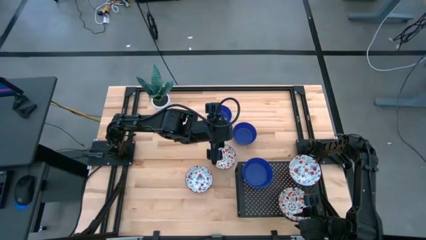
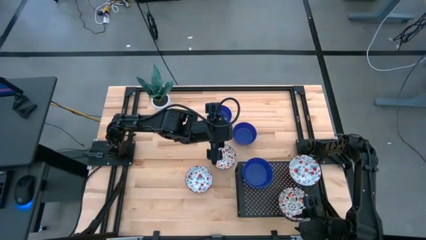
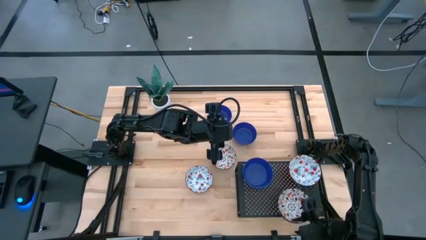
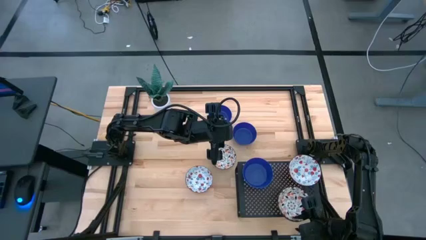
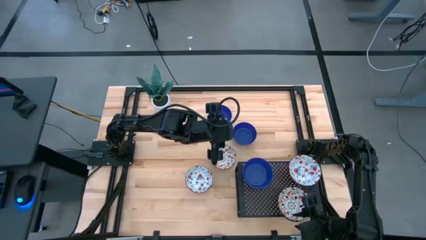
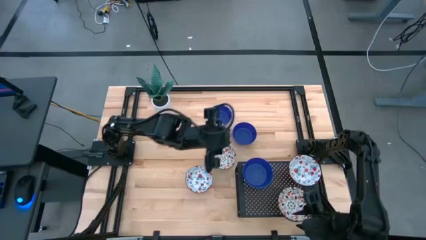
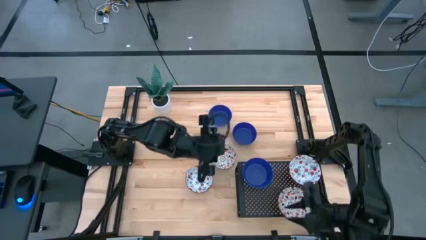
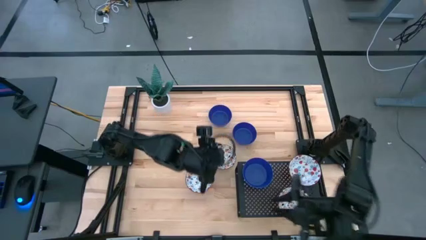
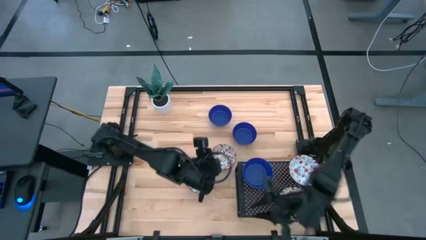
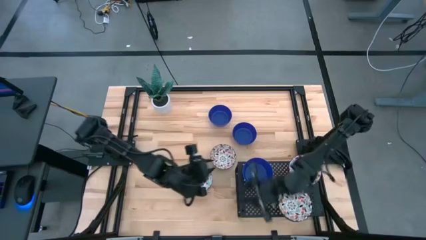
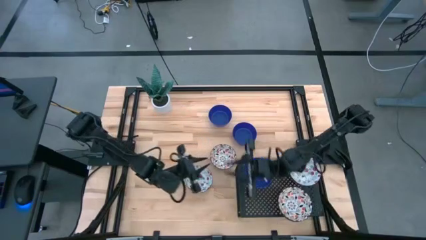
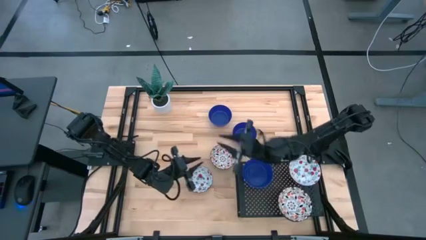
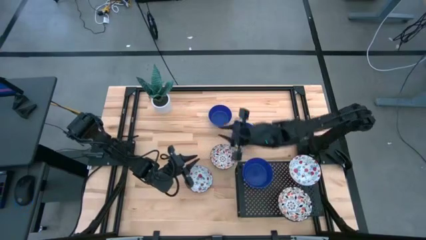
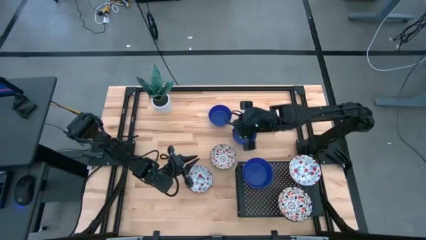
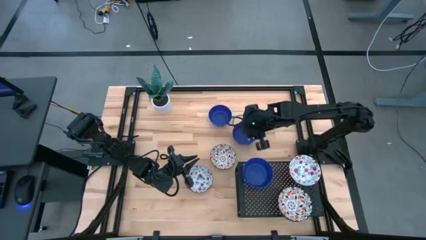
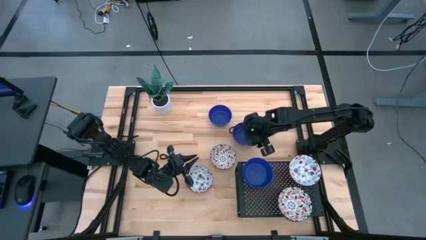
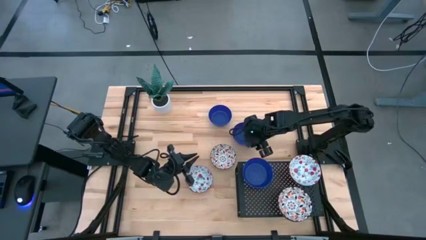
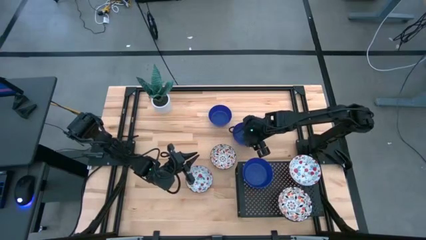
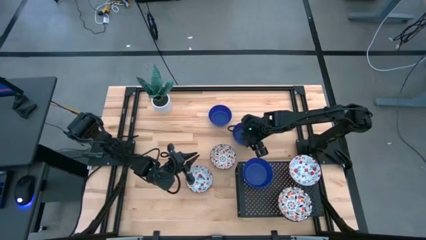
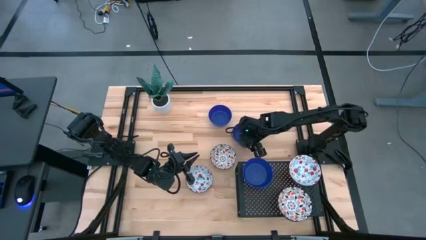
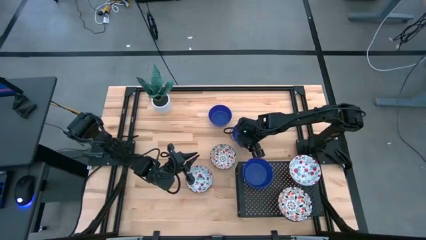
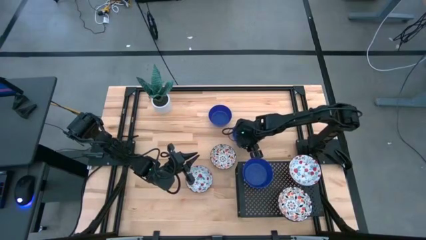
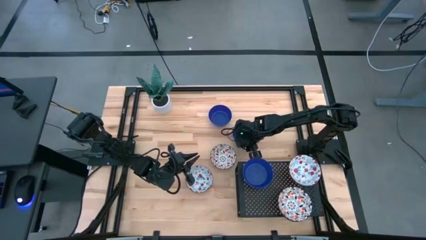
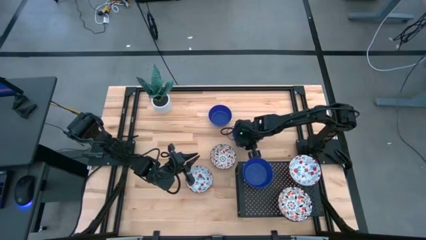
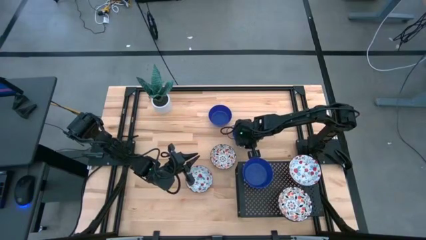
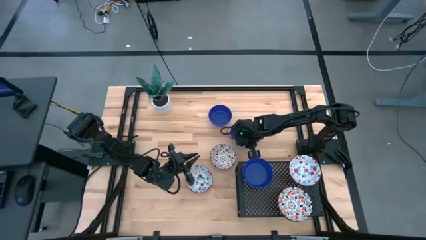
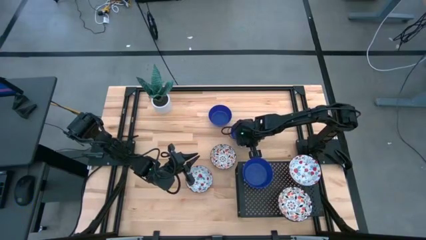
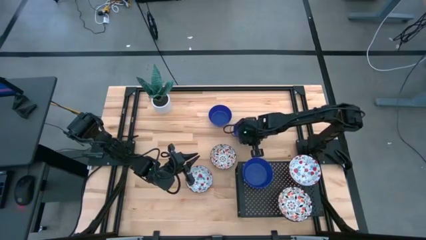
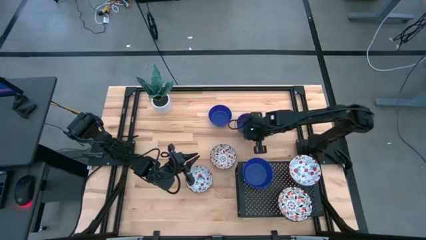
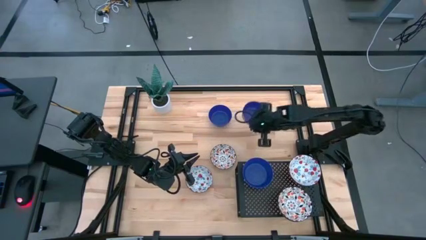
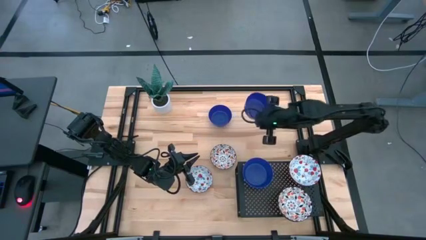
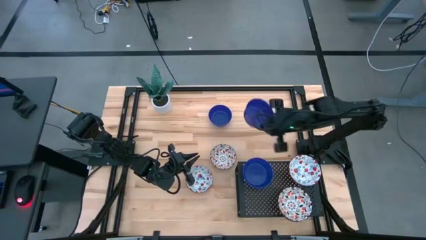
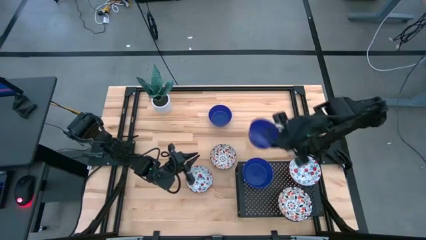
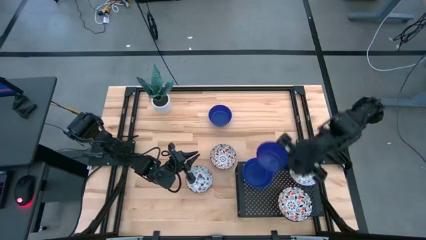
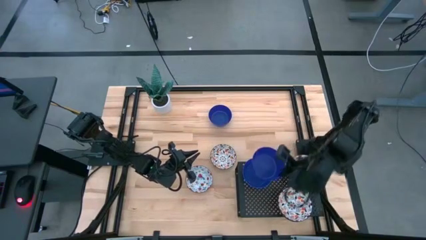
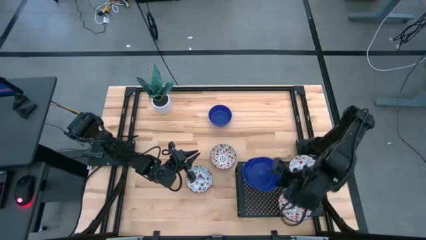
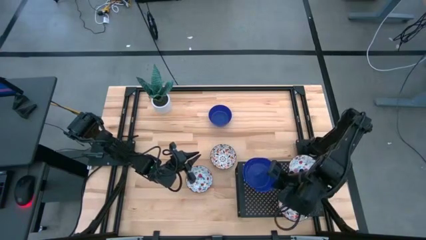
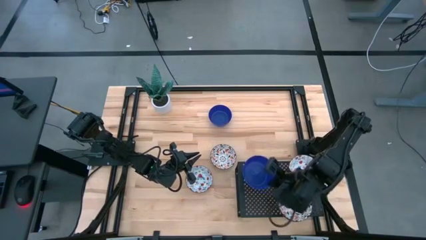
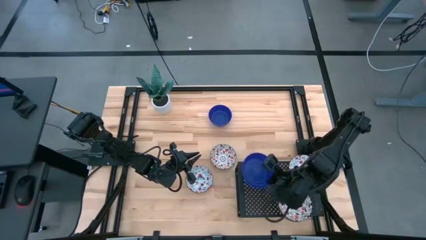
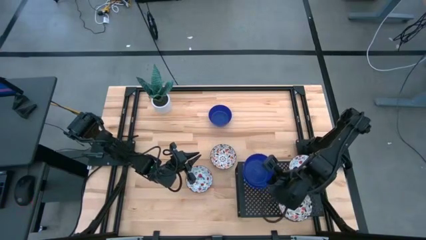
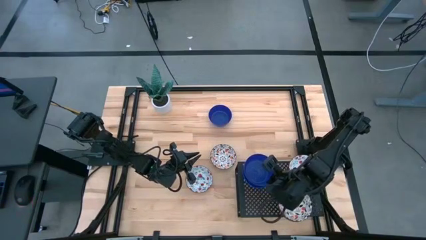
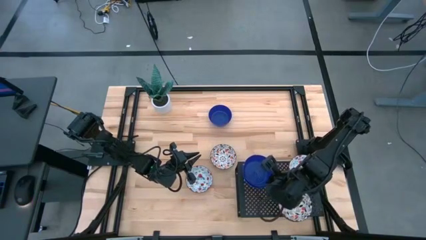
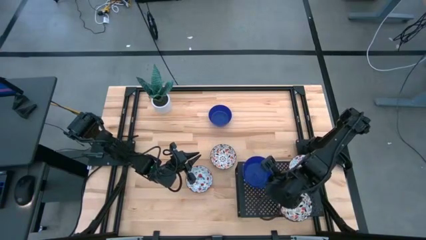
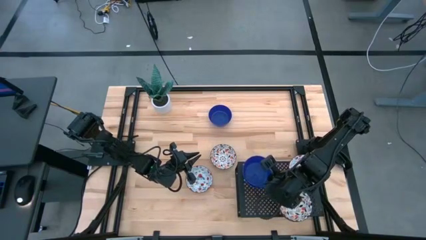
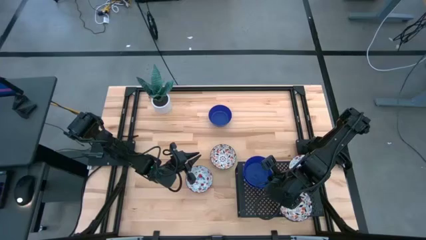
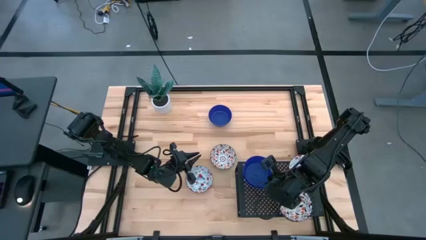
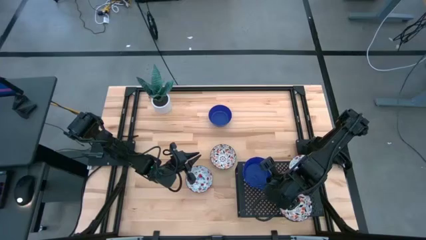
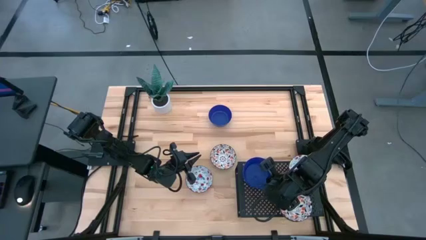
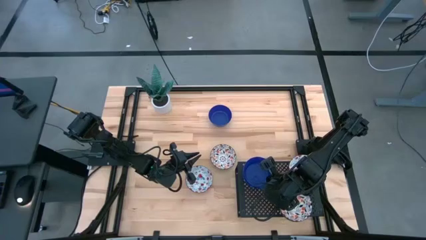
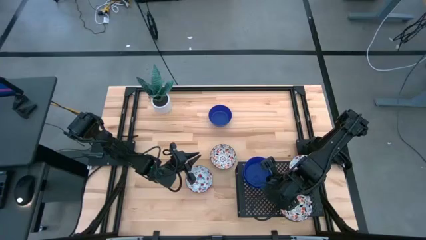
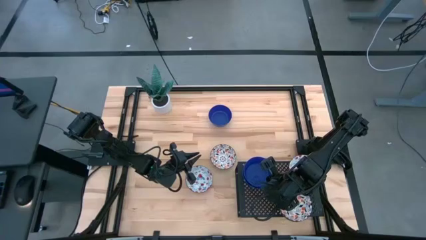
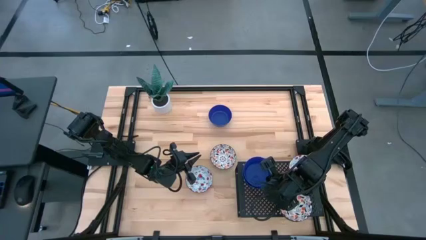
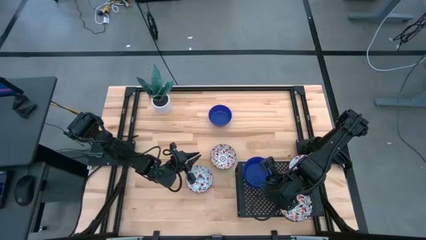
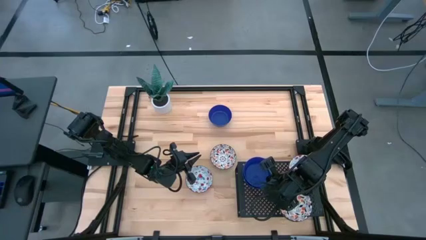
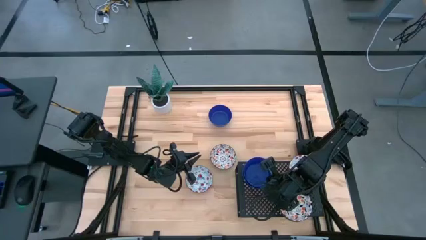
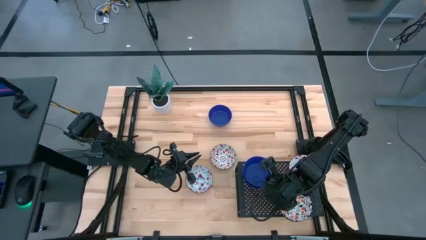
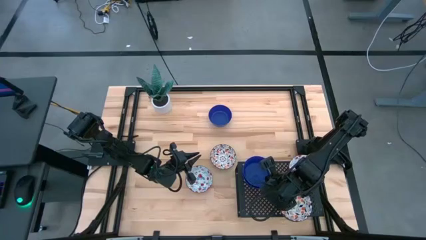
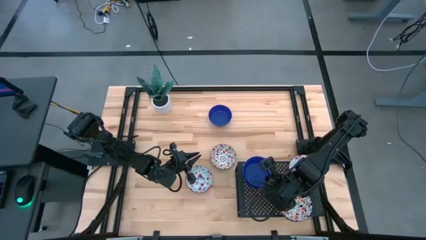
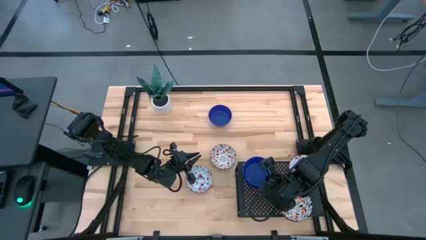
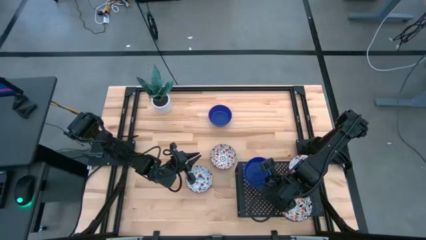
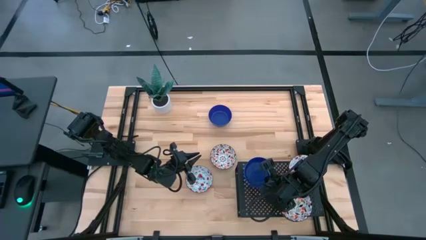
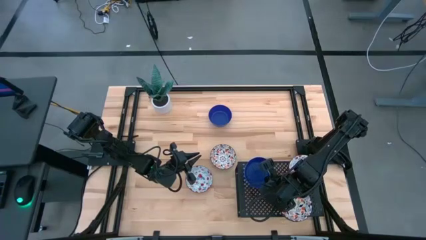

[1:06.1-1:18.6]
Task: Pick & Place Mini bowls
Stack the bottom blue bowl on the blue bowl on the shelf
